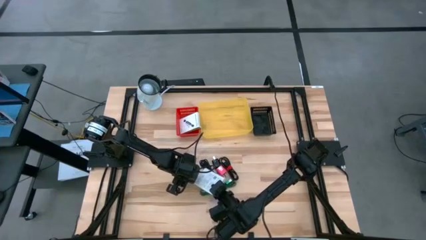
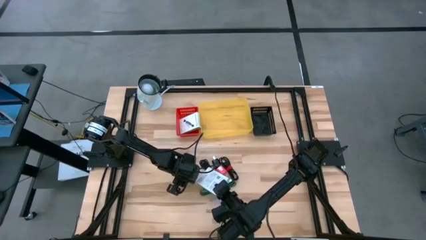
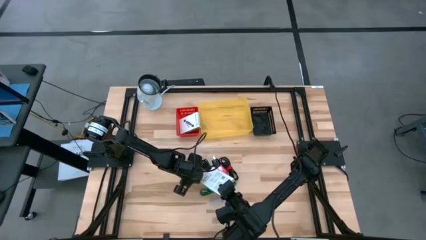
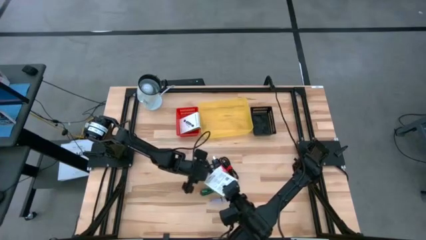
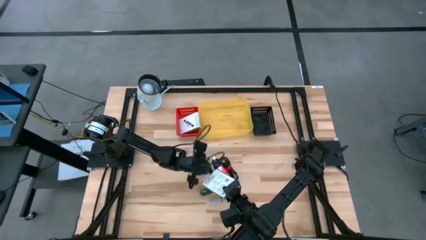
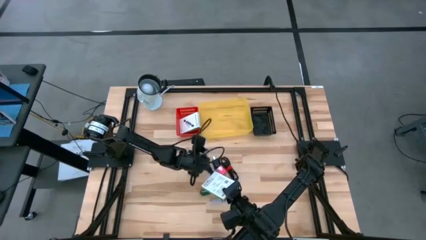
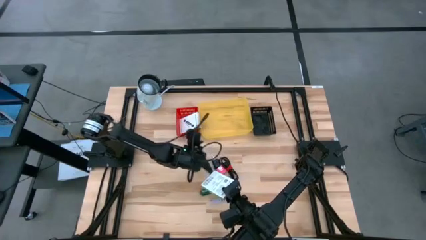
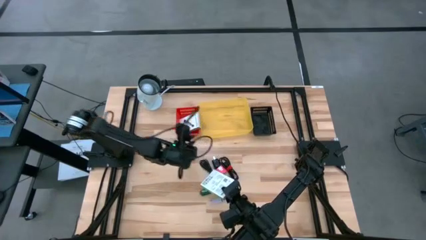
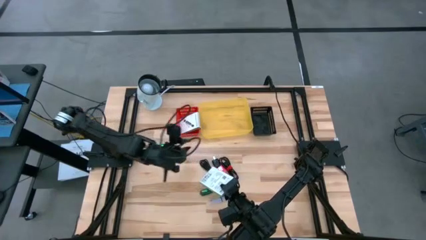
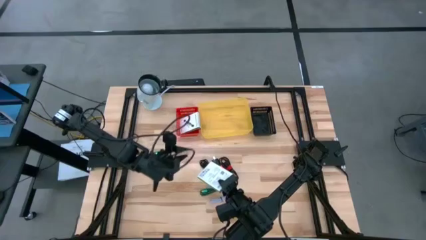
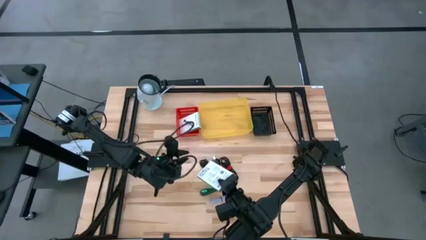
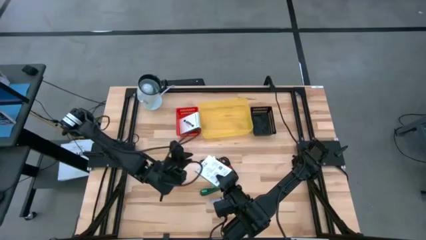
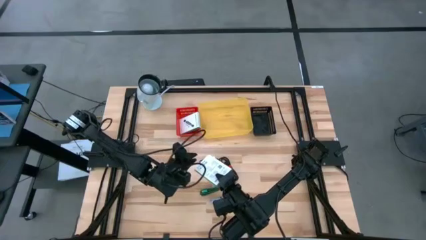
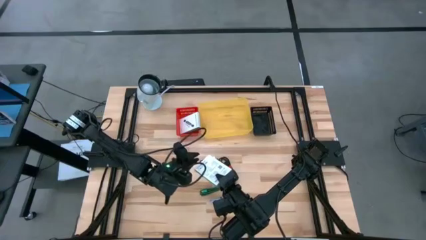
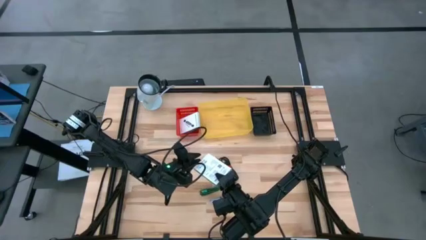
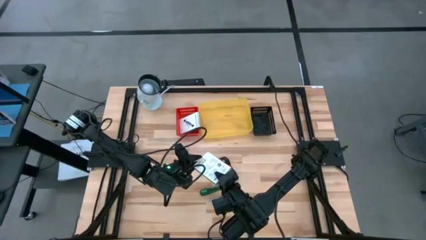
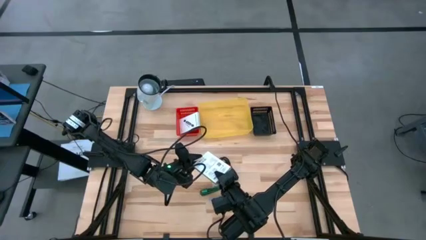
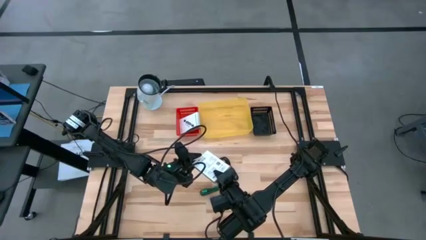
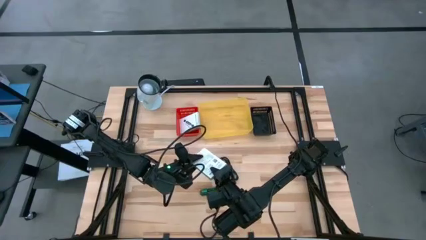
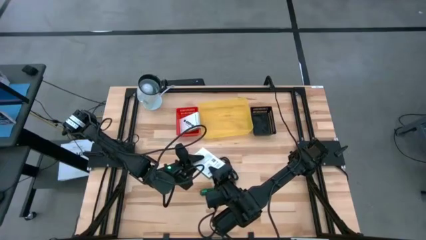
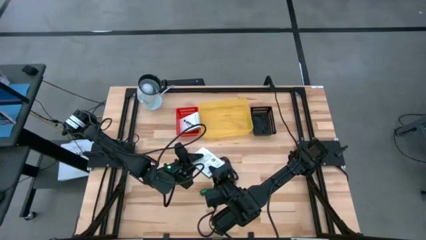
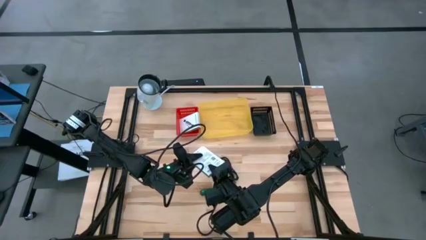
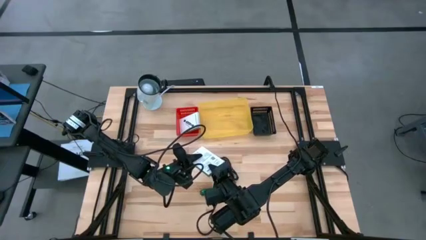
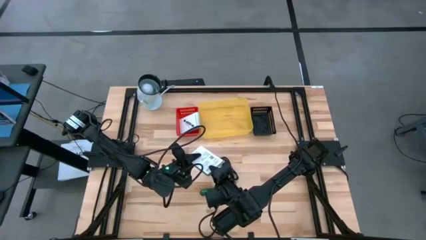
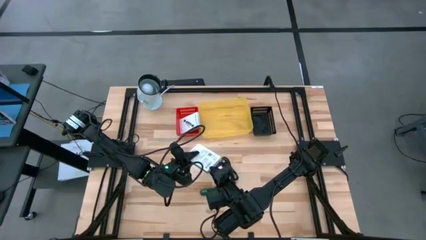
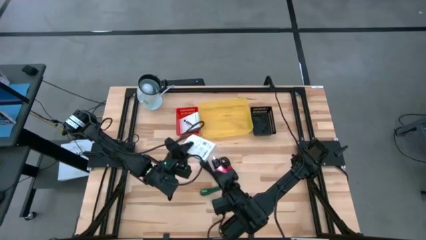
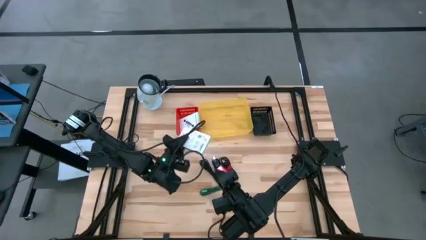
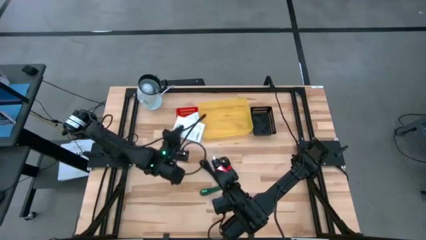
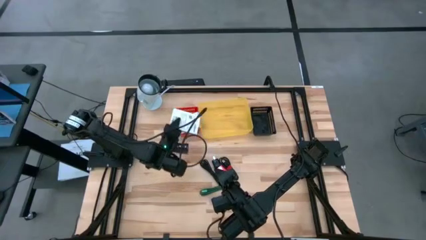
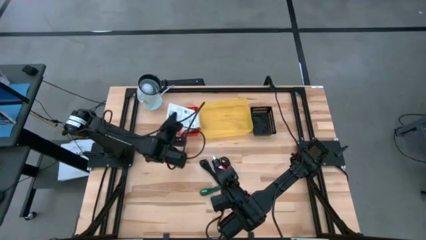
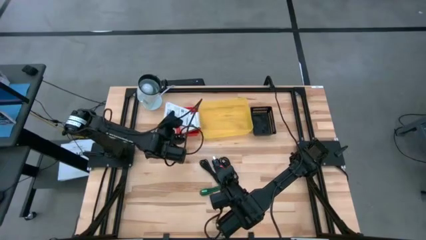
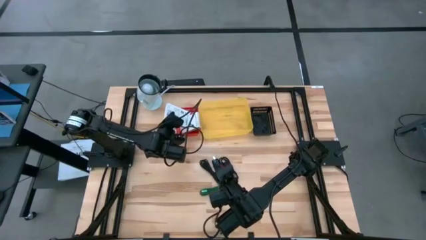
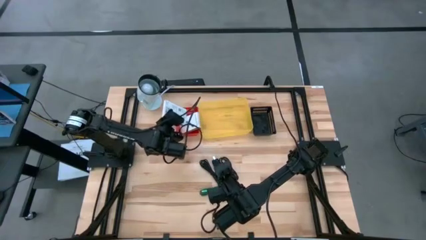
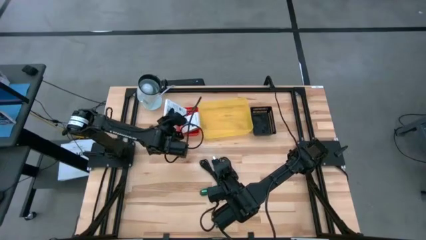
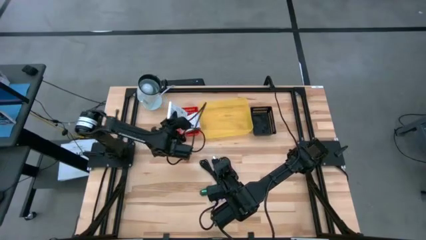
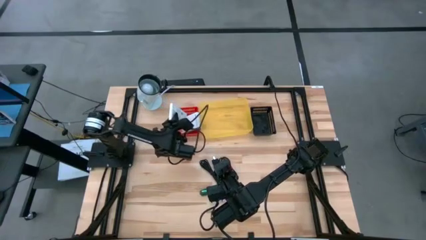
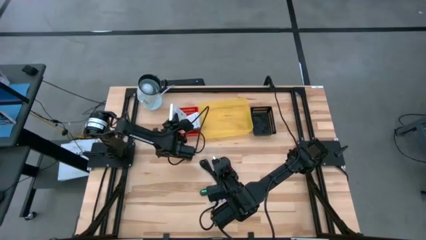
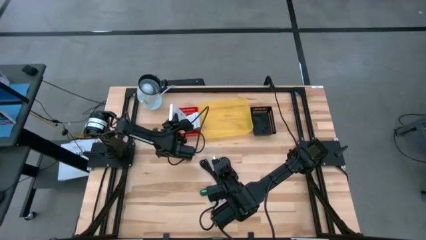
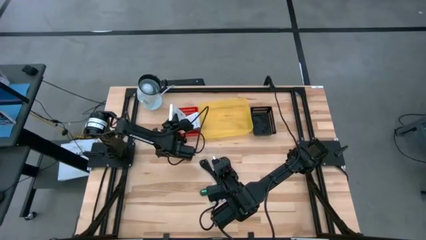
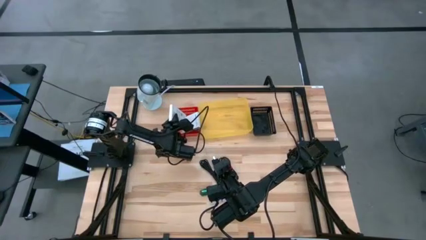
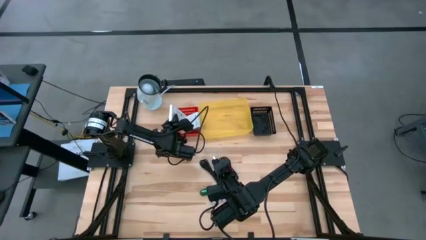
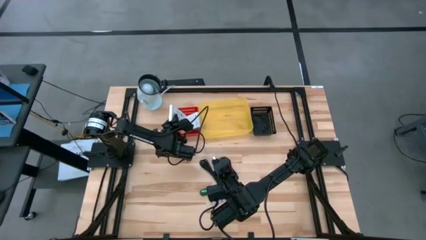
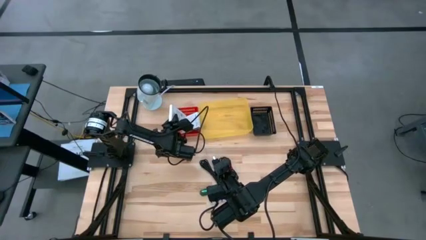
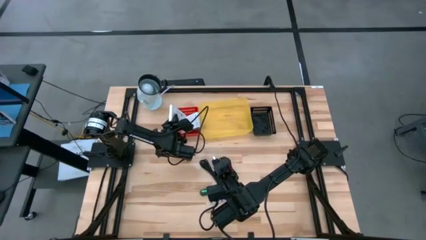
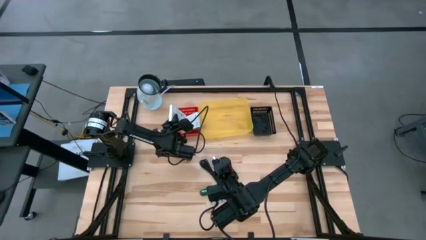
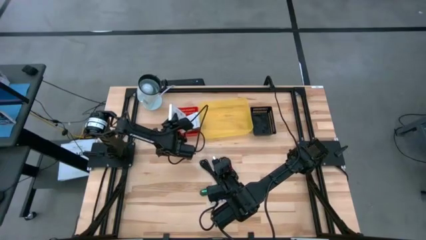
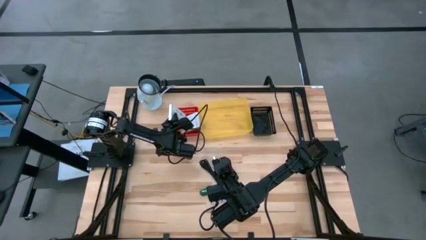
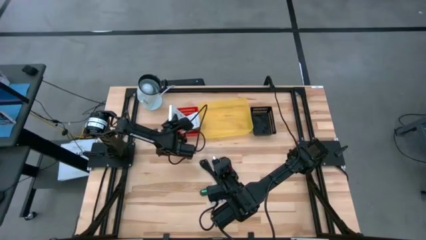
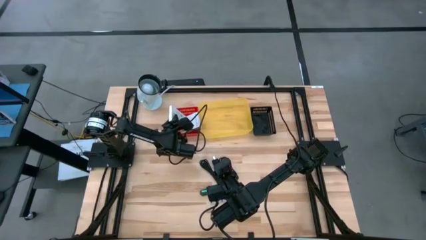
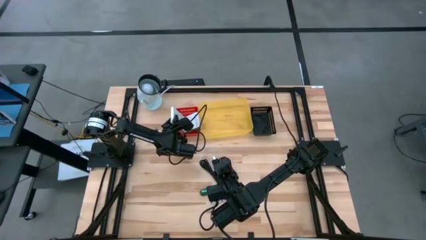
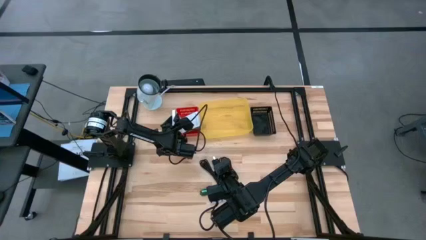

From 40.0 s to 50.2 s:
Task: Pick and place items into bin
Put the white card reader box into the red bin

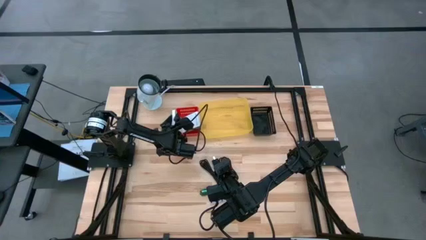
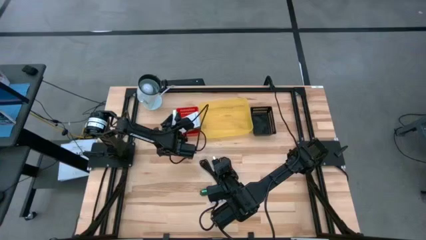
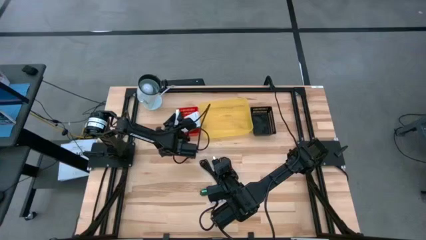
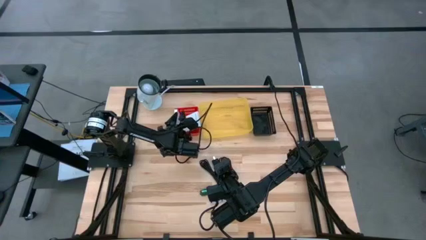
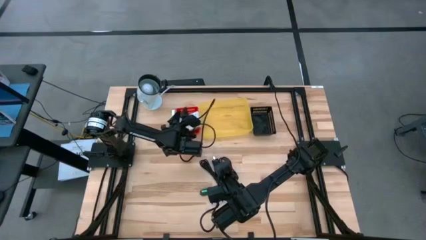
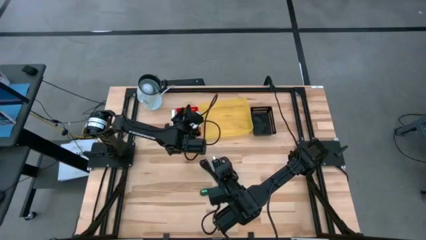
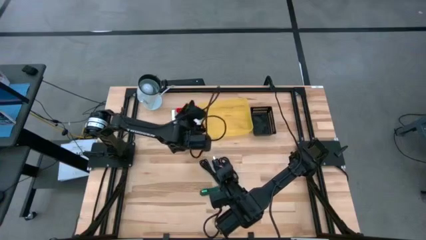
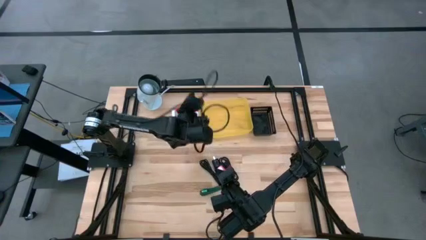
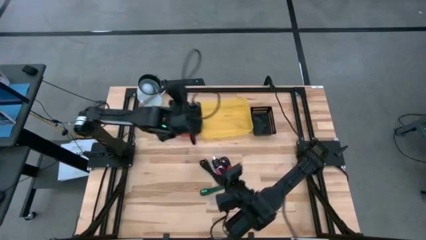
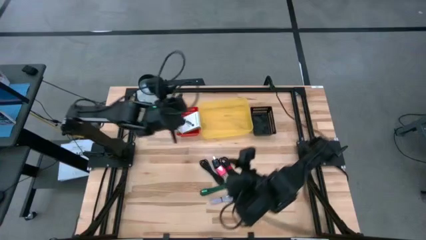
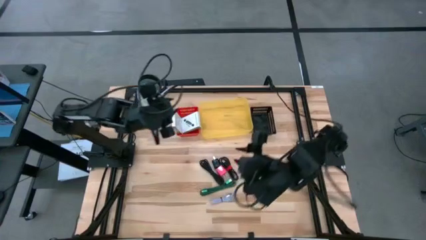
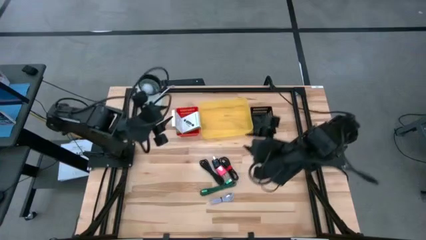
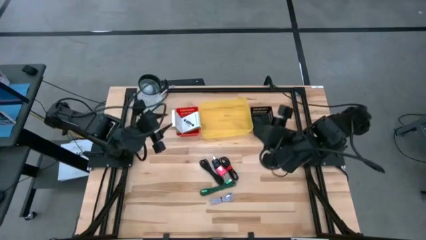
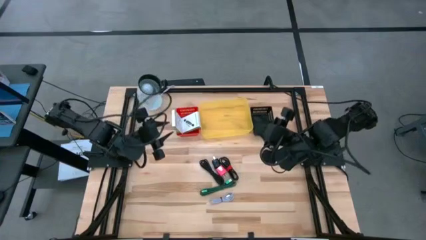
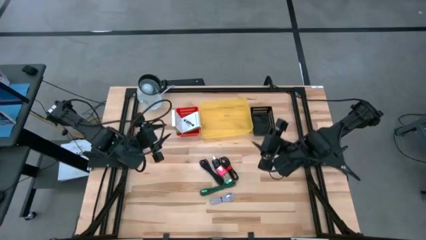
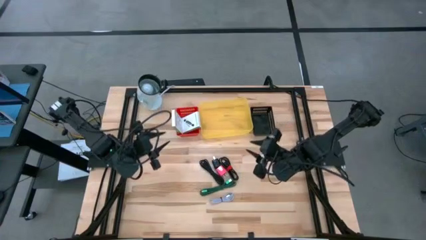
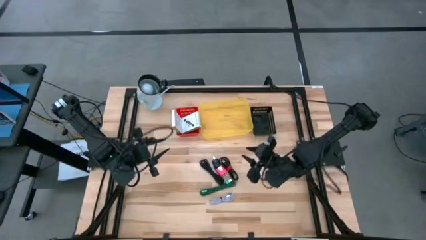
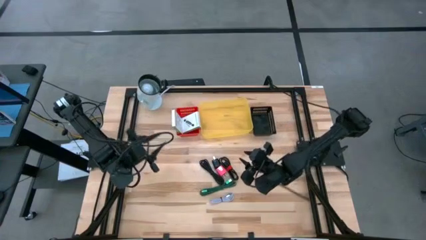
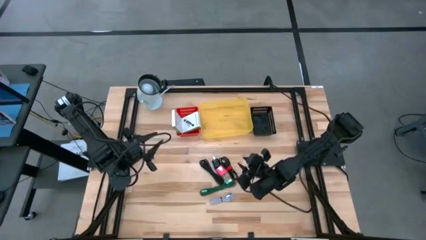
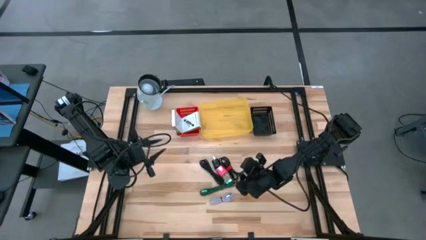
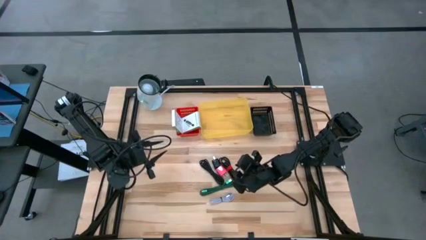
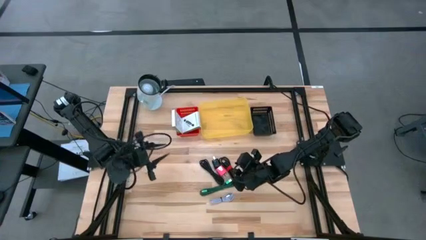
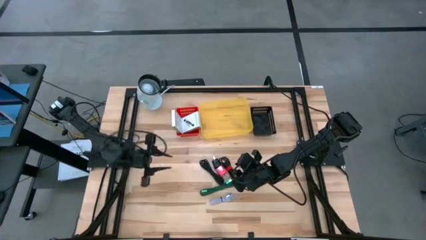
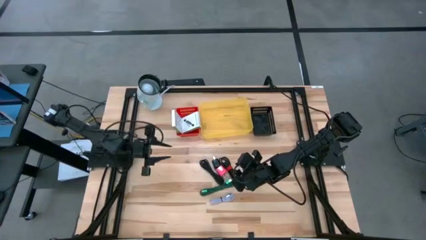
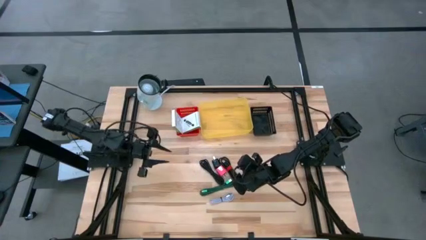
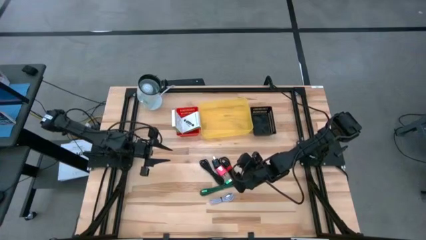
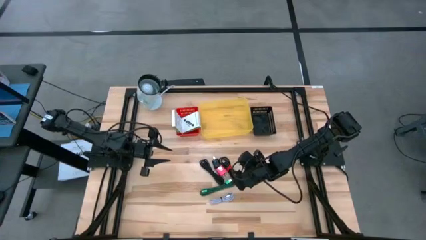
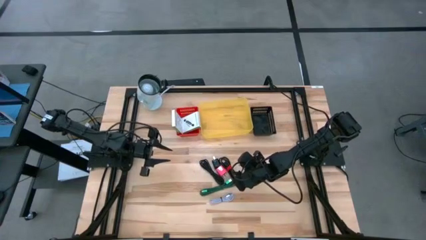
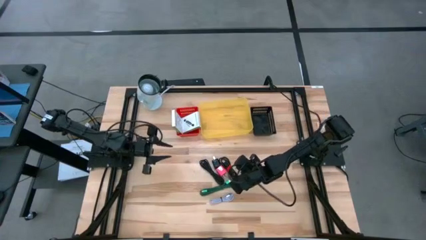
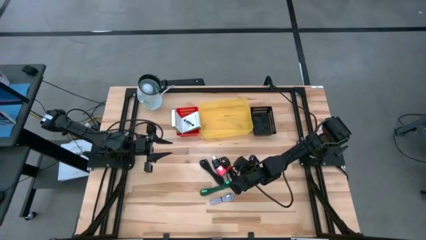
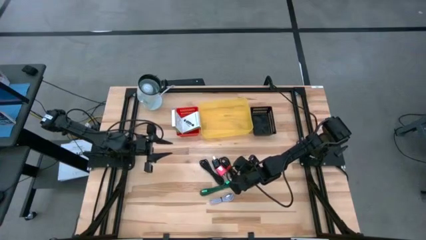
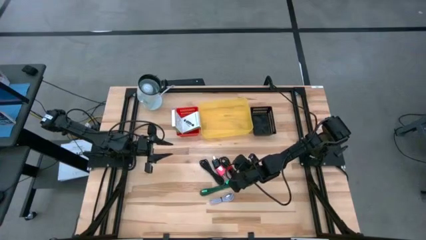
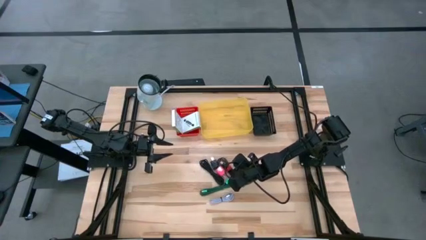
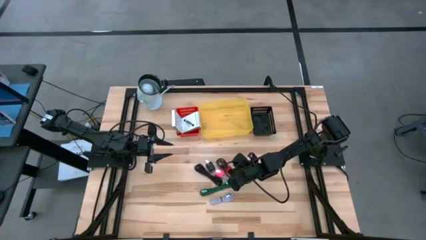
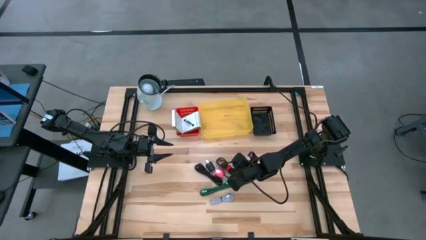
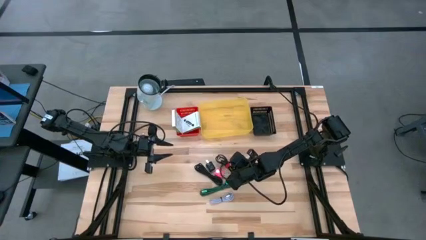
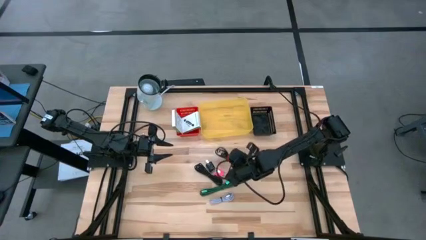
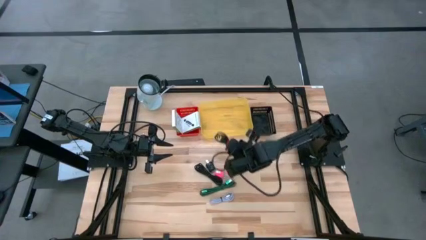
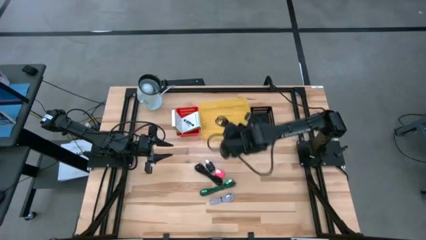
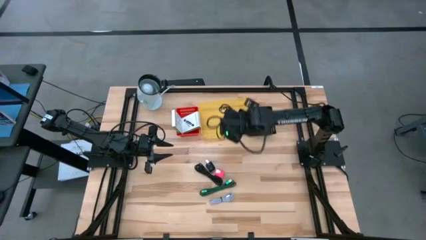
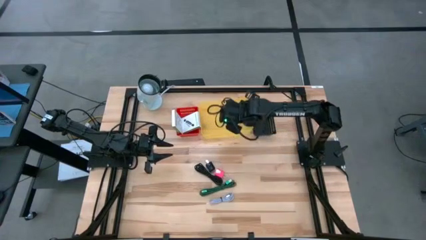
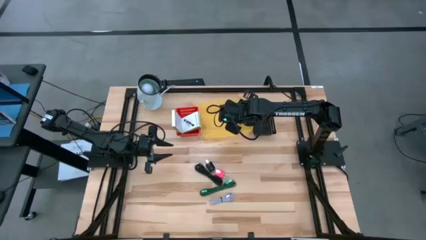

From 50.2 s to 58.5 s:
Put the right black charger cable into the yellow bin
